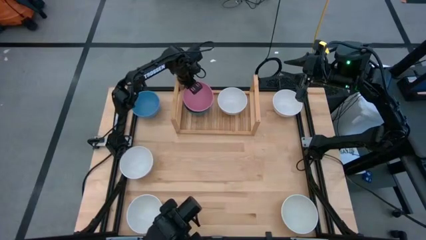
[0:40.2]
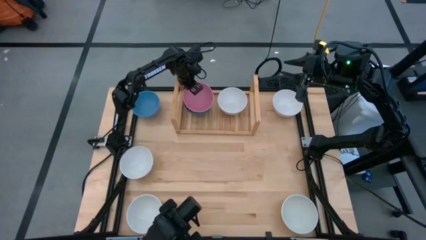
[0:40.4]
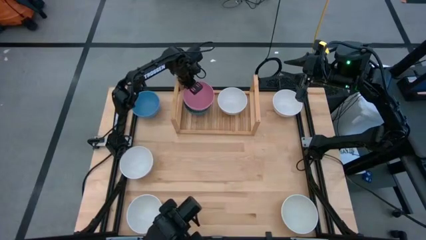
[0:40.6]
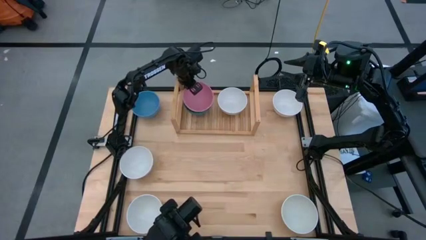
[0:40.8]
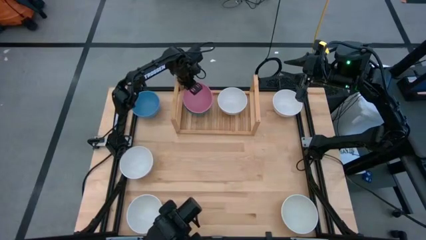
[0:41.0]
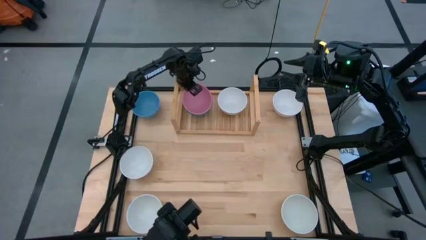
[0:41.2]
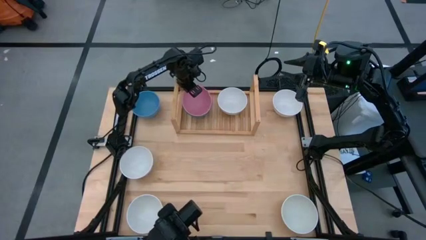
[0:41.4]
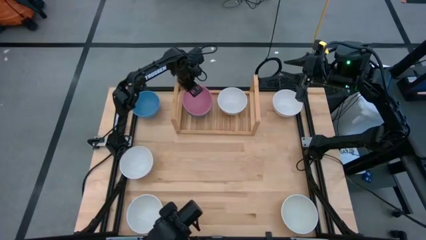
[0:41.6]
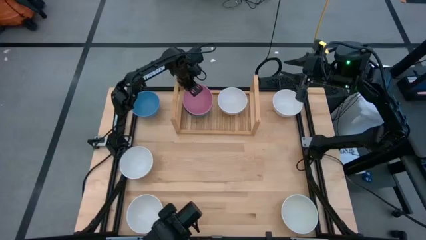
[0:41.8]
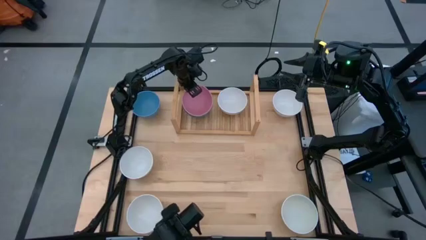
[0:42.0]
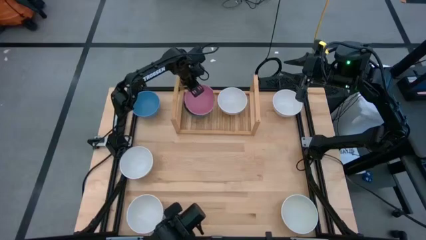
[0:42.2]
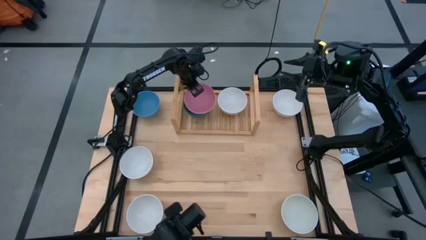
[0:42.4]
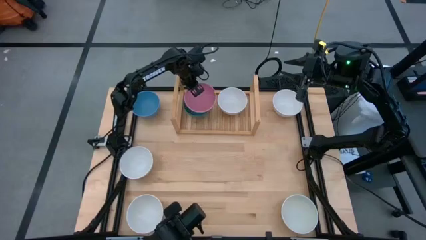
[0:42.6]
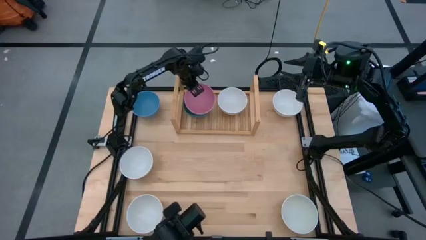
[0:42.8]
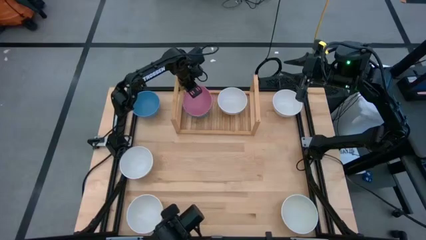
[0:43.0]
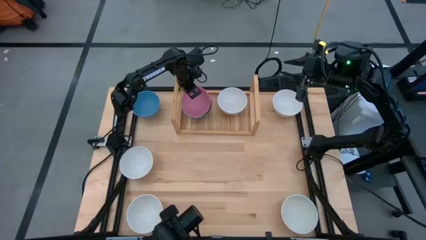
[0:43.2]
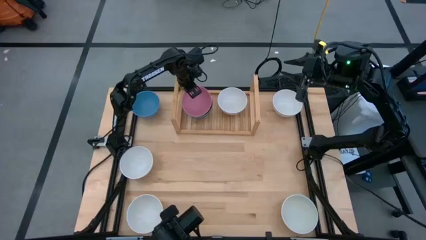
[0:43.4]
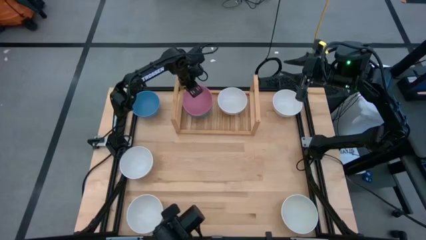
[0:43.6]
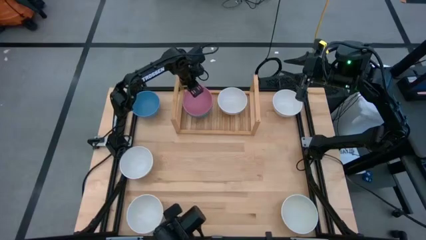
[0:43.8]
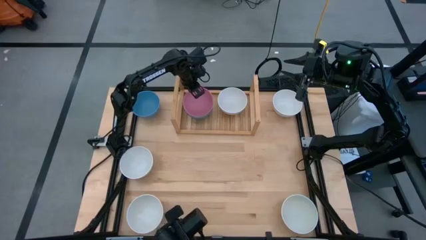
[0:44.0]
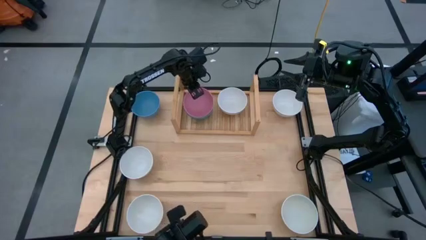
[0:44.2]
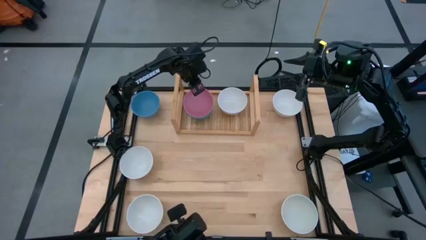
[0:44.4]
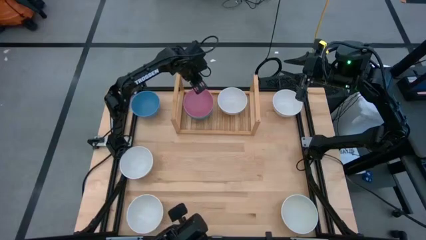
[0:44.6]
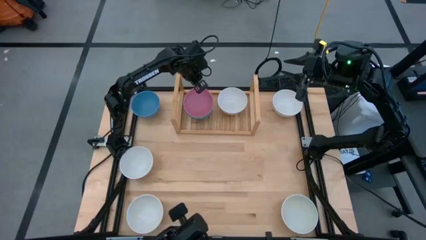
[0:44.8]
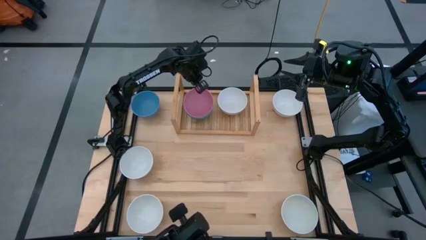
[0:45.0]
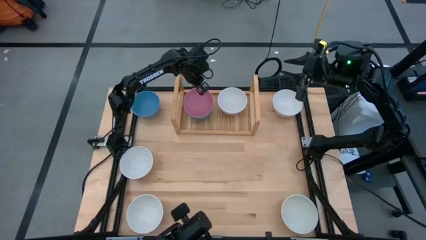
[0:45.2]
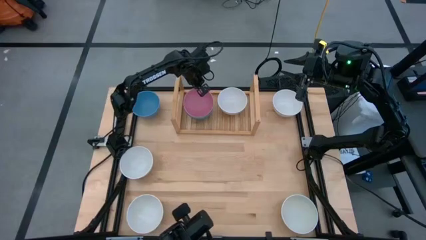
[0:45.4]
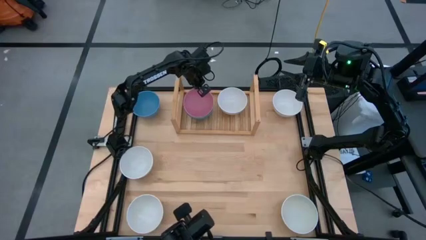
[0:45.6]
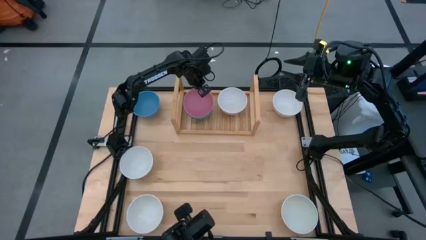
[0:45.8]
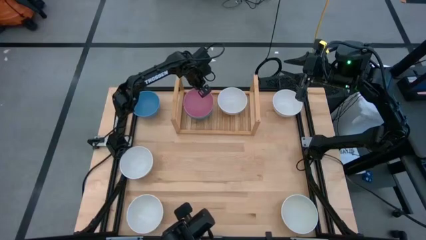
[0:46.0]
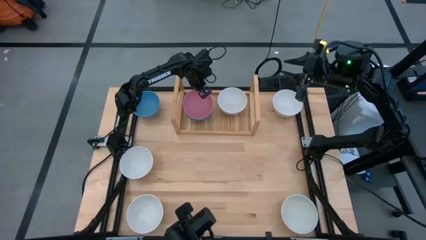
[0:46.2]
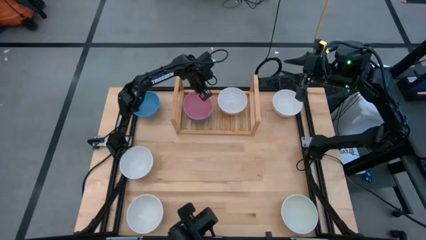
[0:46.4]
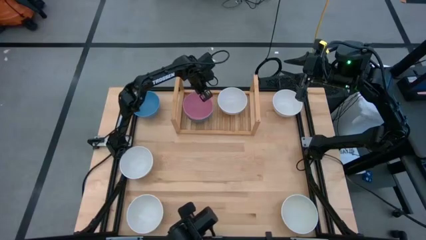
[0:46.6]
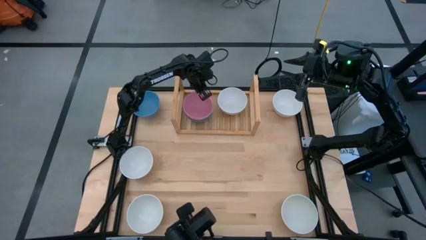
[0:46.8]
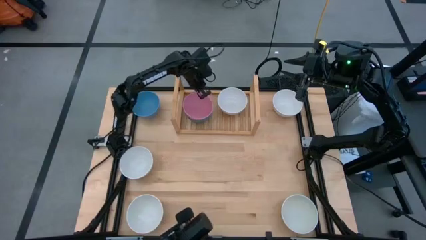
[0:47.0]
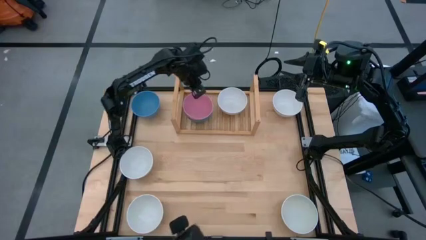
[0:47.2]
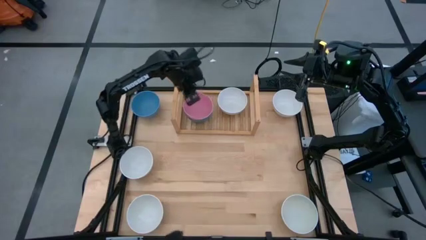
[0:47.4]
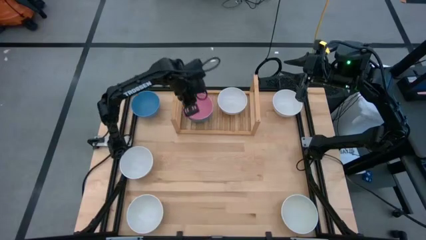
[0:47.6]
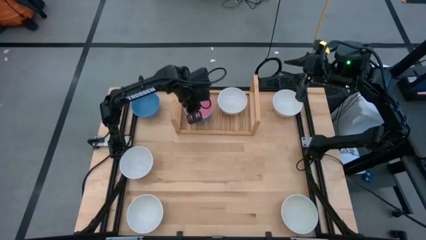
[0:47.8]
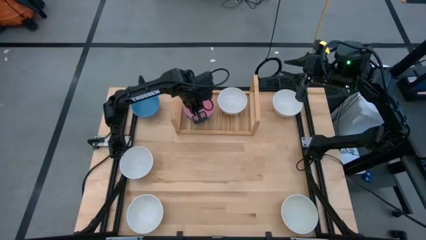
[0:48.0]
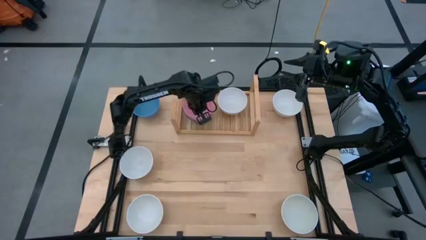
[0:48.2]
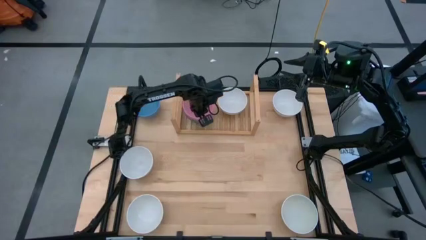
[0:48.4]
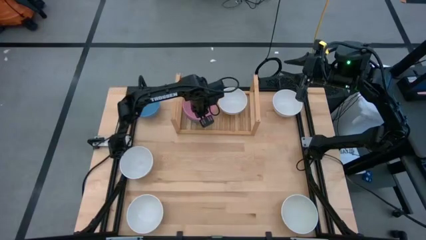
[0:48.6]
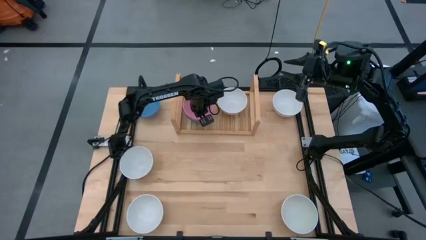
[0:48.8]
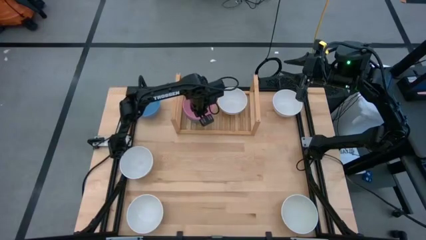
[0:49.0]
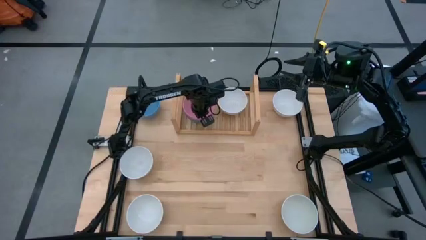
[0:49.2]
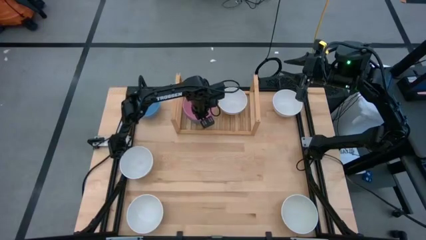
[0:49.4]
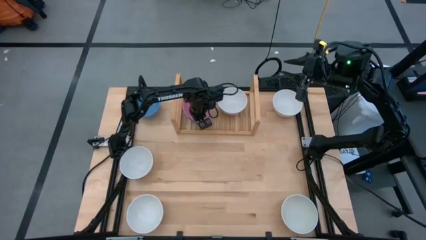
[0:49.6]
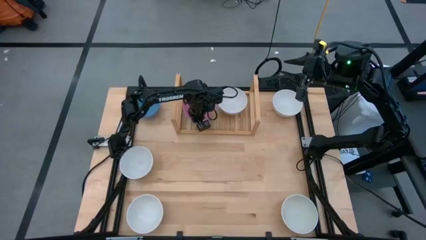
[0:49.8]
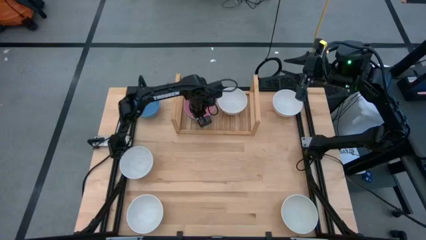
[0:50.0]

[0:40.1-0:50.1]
Task: Place and stack bowls onto a shelf
Stack the pink bowl on top of the dark green bowl on the shelf

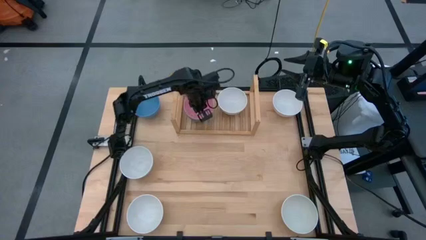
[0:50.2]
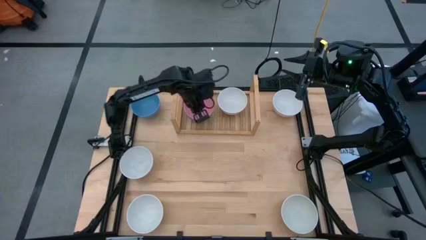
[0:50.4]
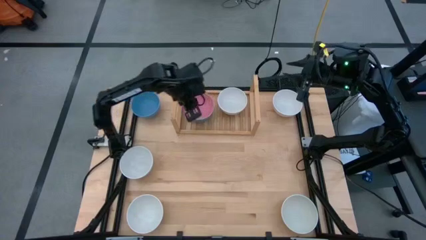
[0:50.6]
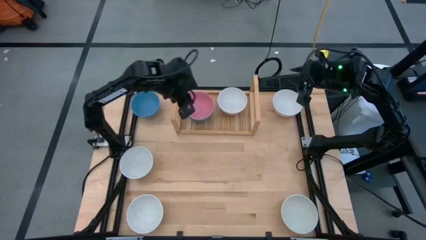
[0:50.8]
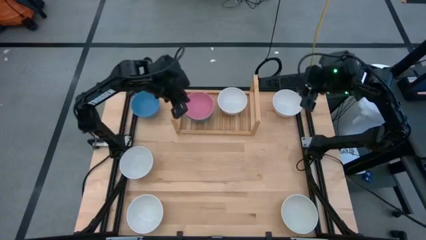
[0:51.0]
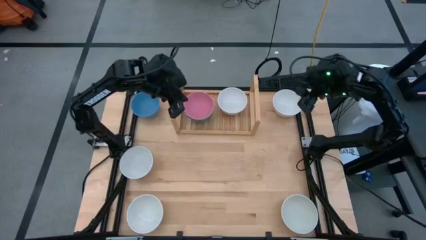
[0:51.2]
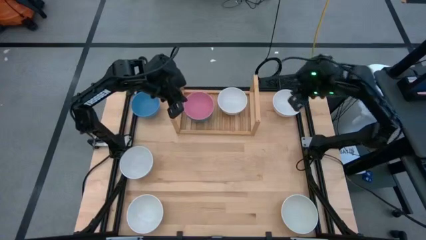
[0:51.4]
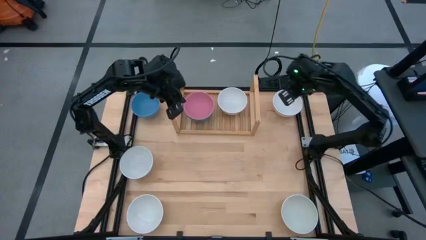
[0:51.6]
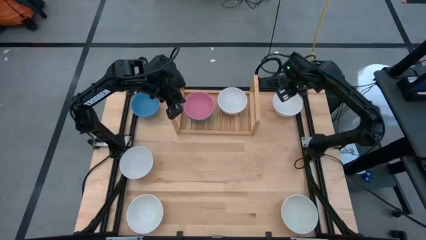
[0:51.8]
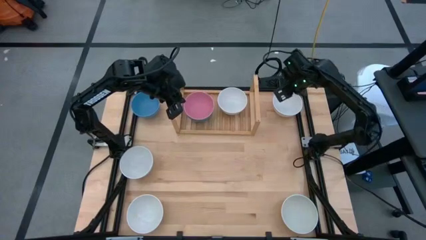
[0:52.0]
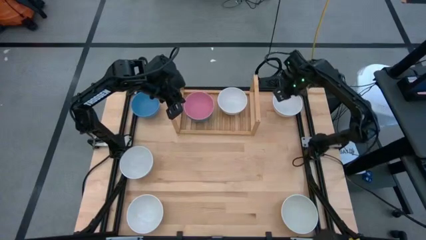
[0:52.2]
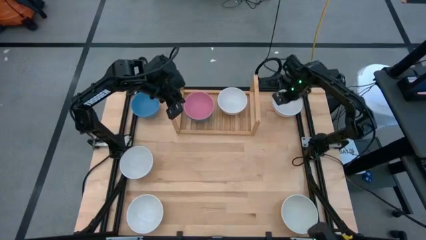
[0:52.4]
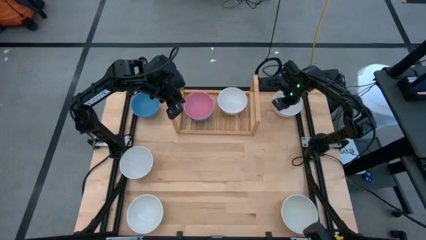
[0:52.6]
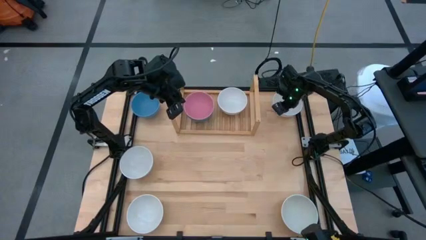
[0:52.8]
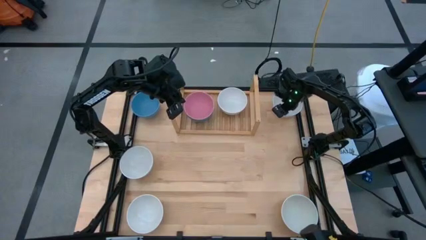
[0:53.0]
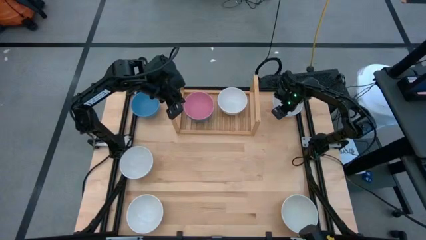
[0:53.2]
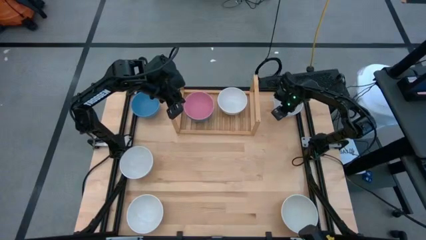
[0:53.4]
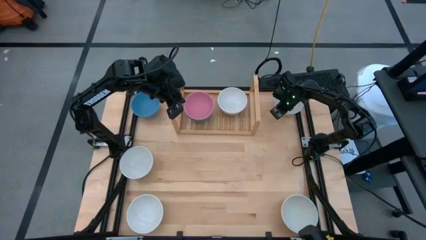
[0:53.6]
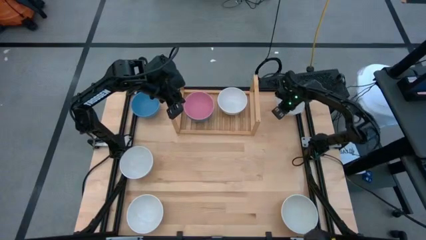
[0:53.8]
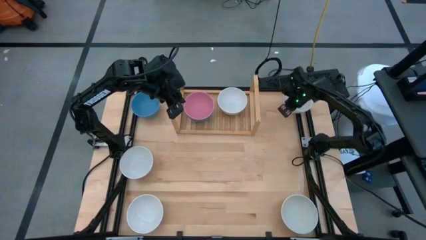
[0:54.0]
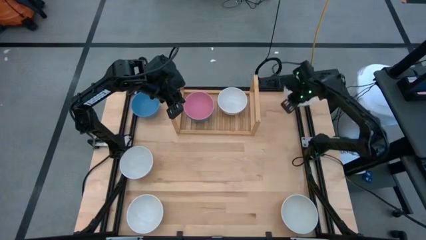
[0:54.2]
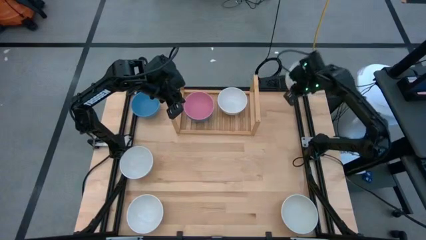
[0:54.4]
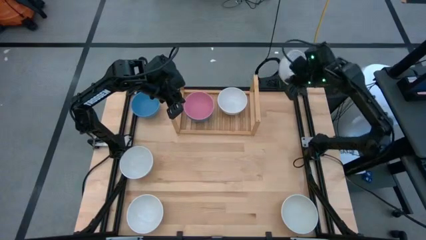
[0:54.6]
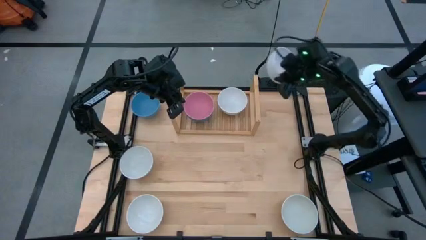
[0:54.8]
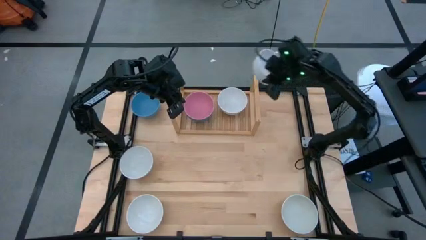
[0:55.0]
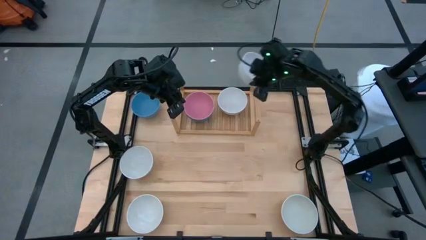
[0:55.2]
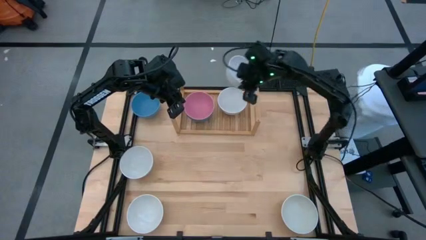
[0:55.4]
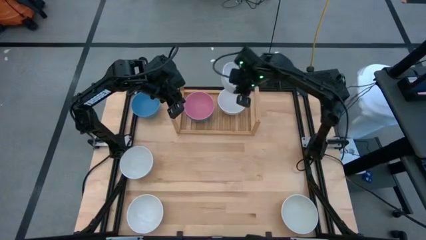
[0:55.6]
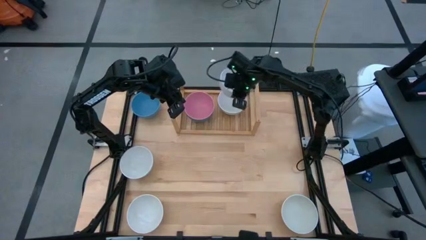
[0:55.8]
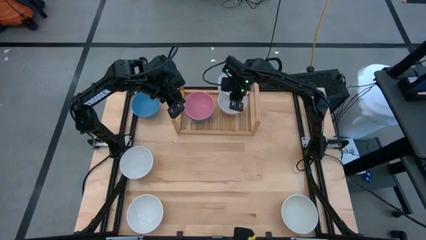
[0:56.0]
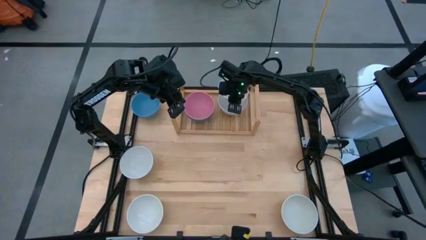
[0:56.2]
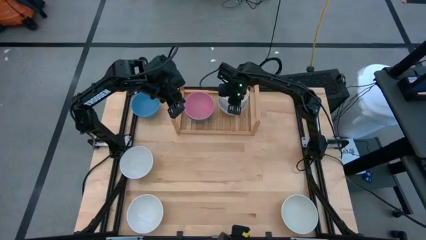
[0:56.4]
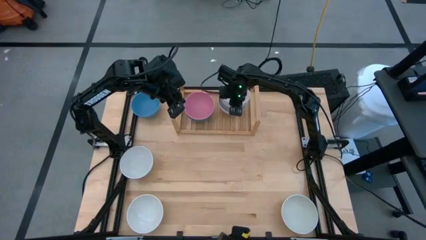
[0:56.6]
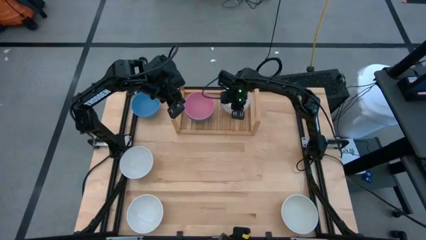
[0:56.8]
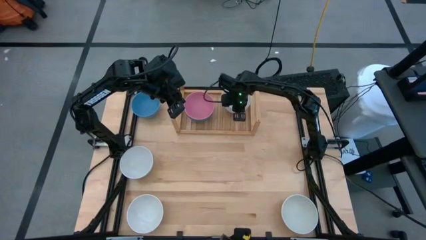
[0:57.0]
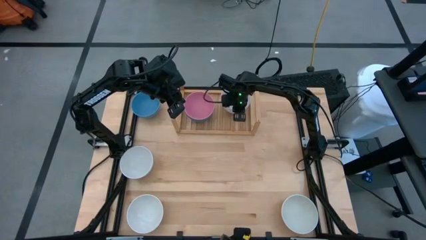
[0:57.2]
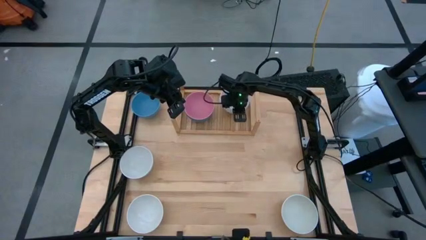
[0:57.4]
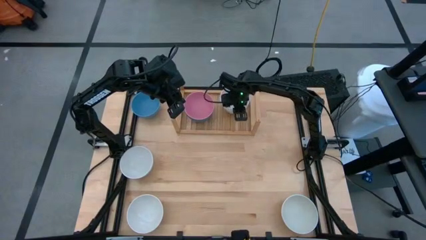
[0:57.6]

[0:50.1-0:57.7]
Stack the top white bowl on top of the white bowl on the shelf
